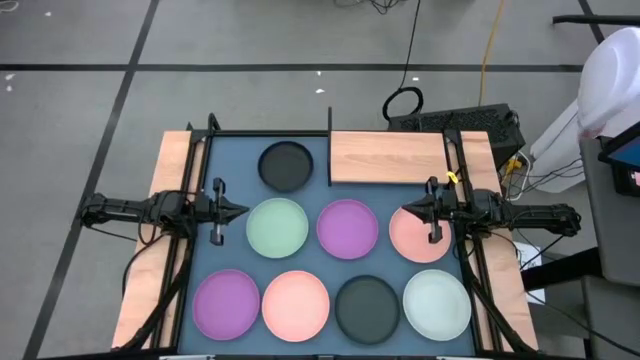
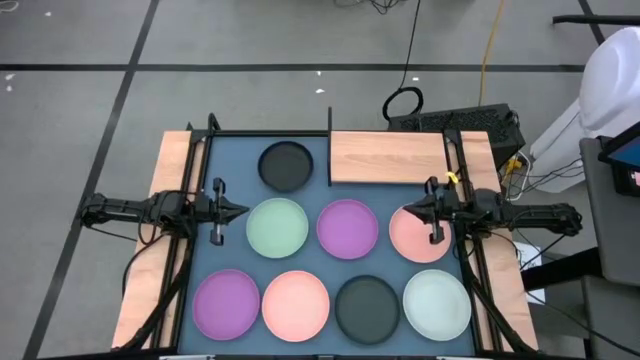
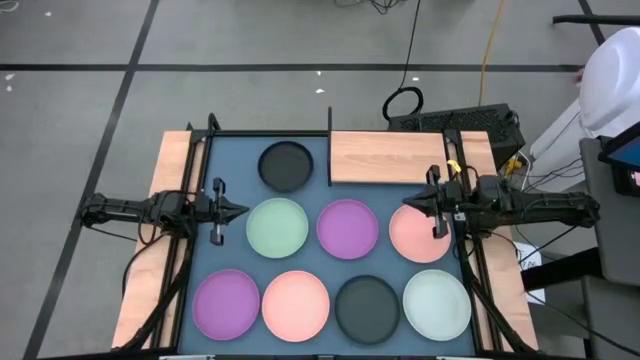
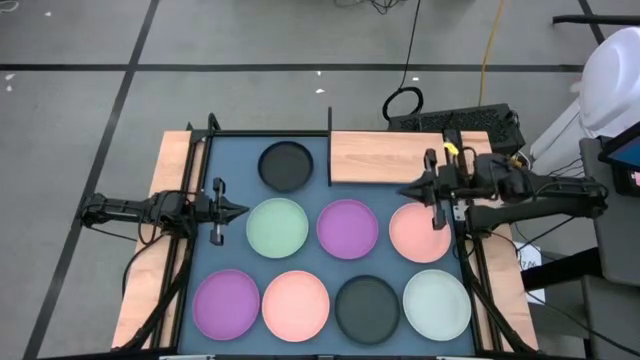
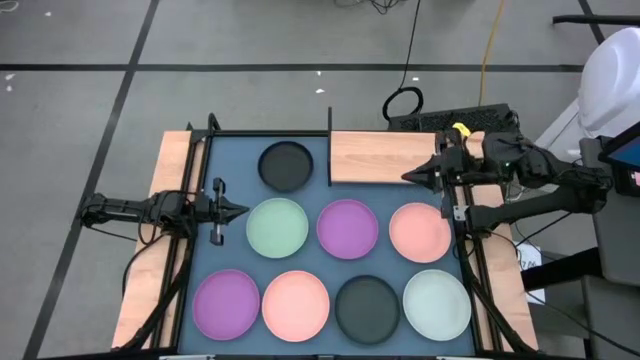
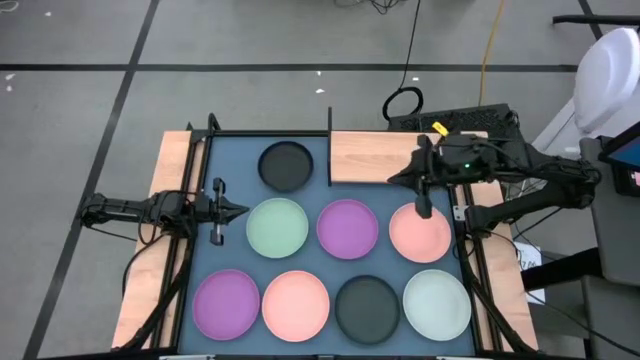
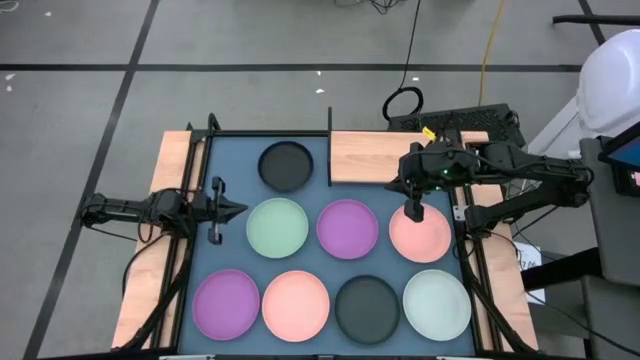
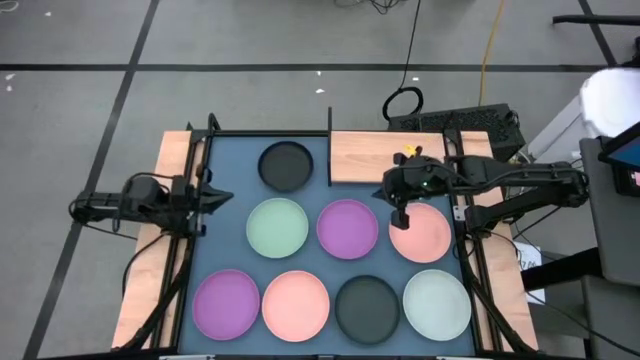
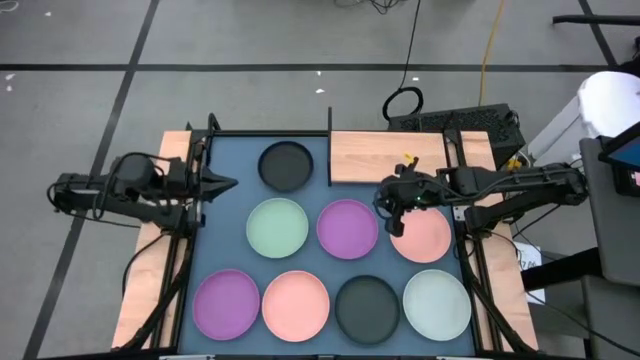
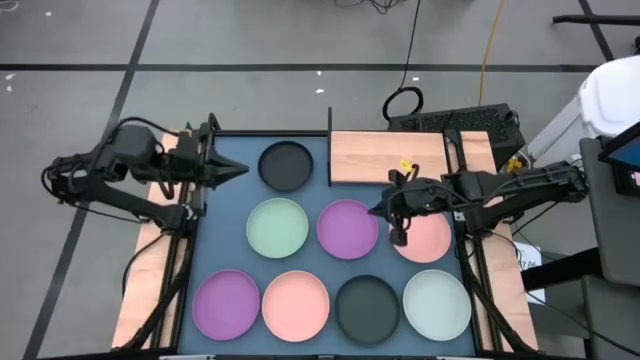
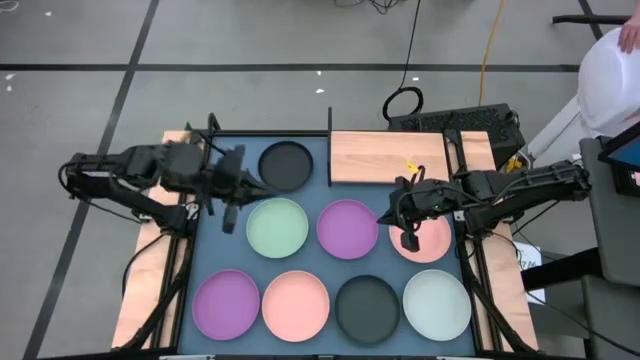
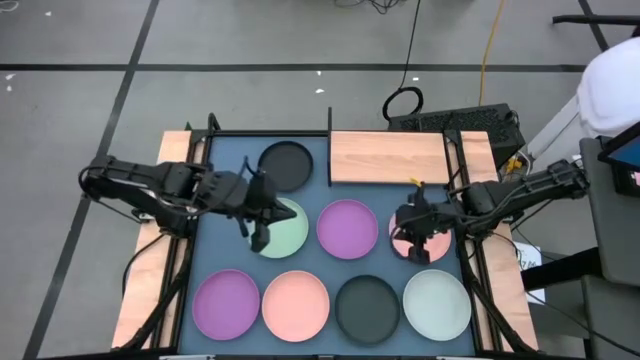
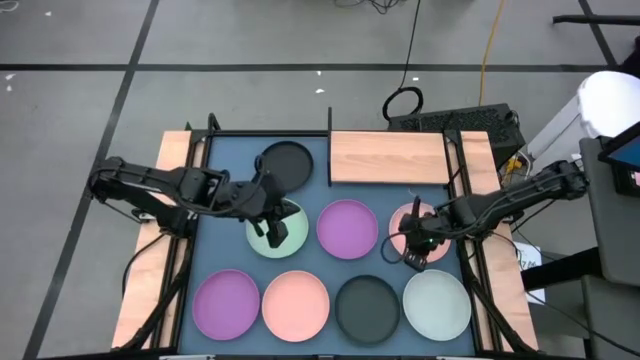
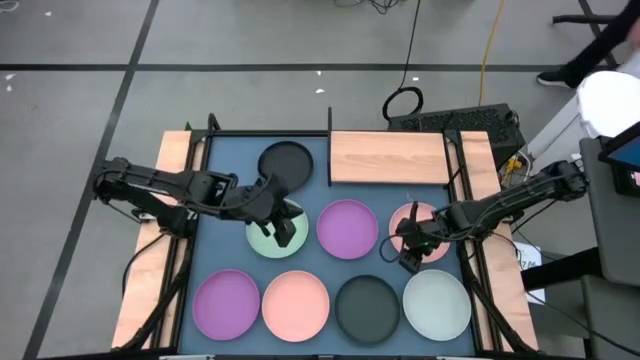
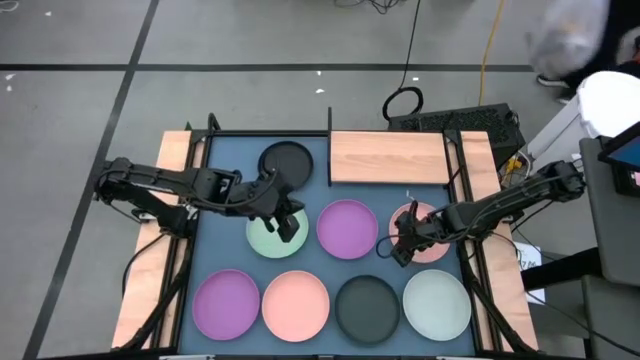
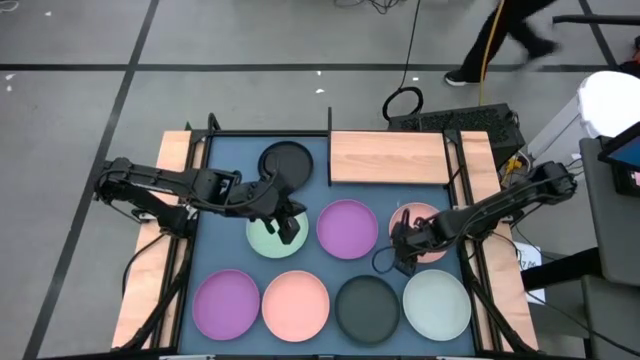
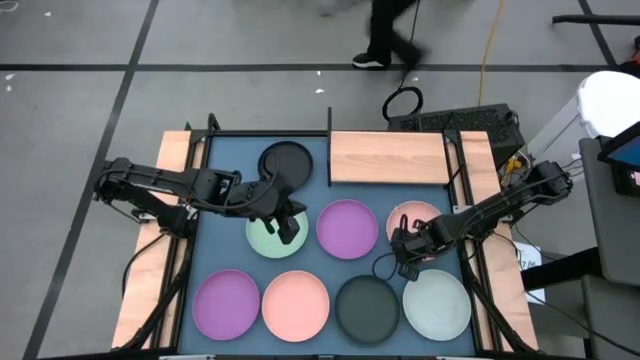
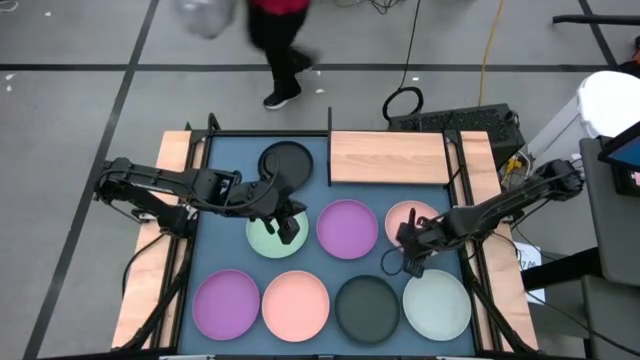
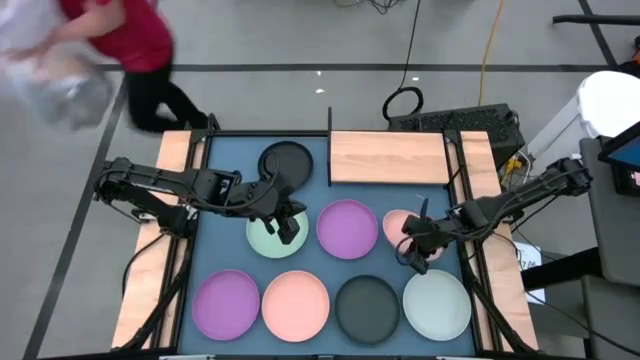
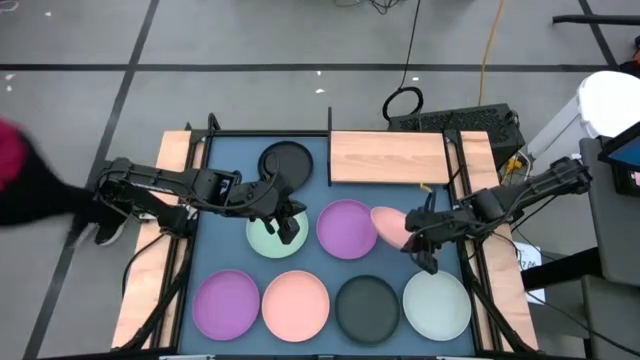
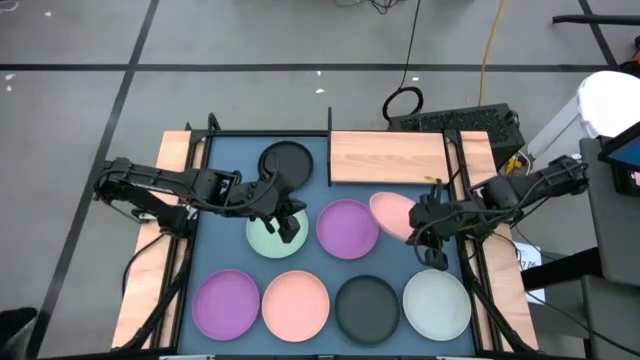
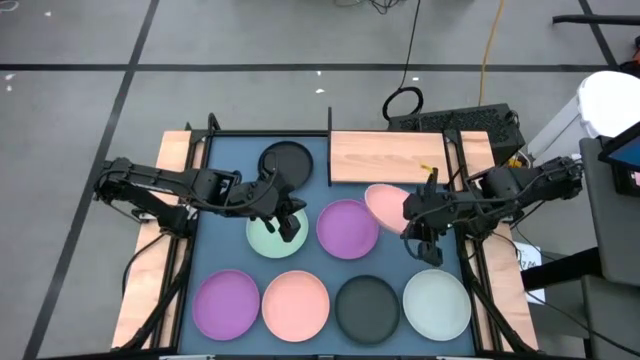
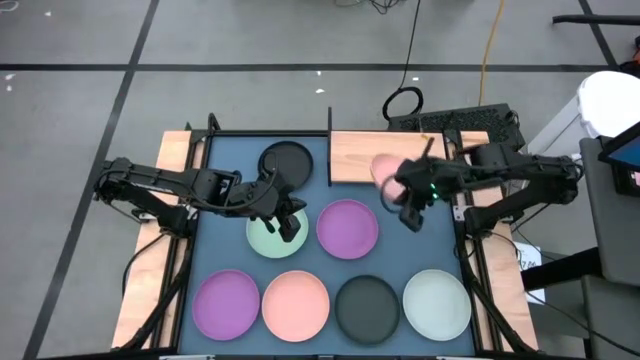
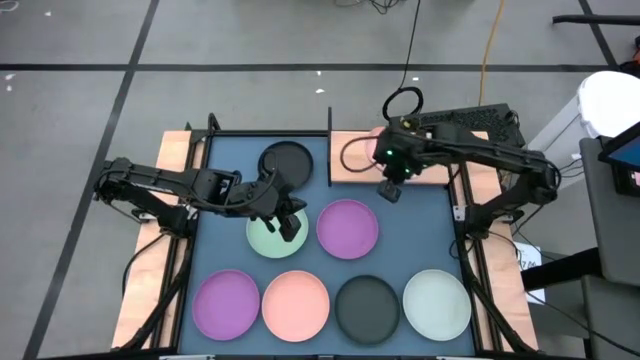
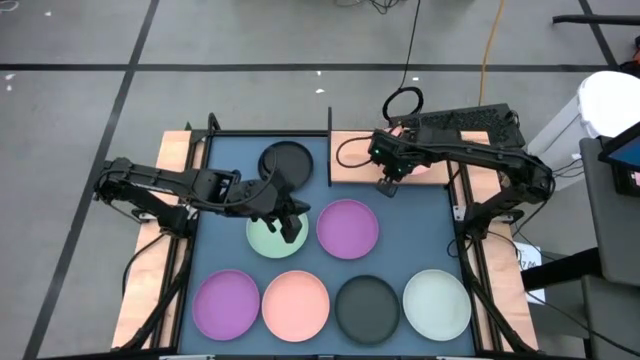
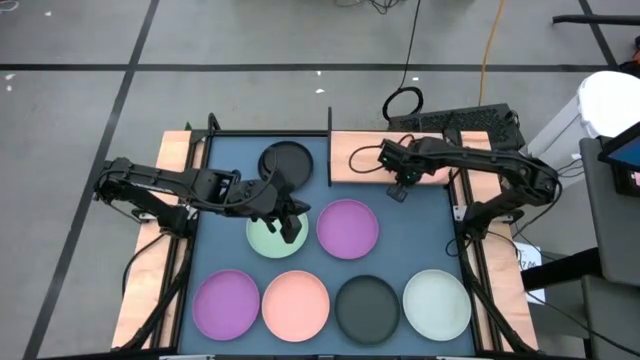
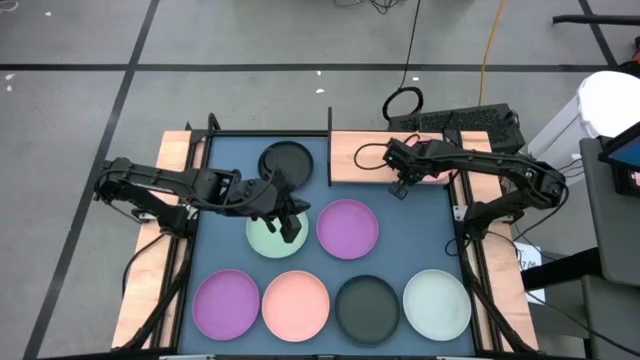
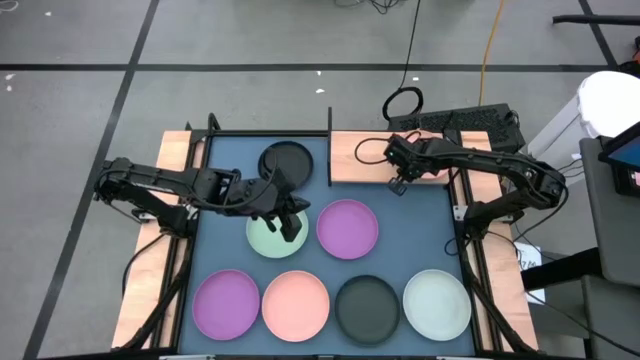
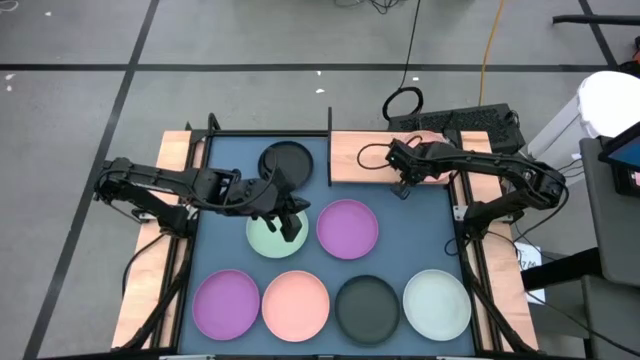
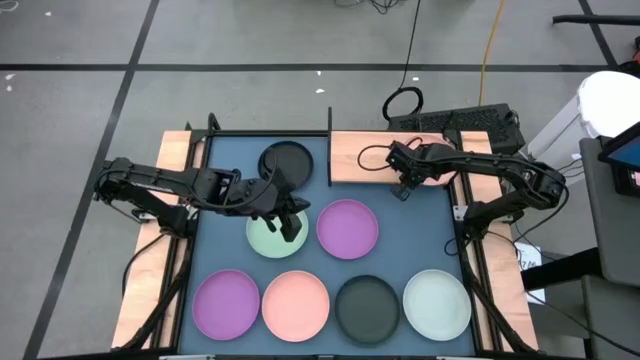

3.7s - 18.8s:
Task: Place and stack plates onto a shelf
Put the top orange plate on the shelf

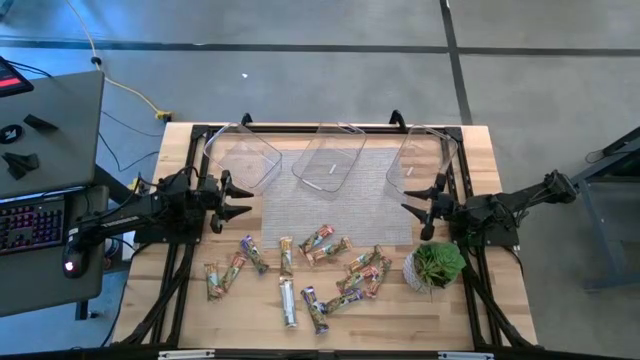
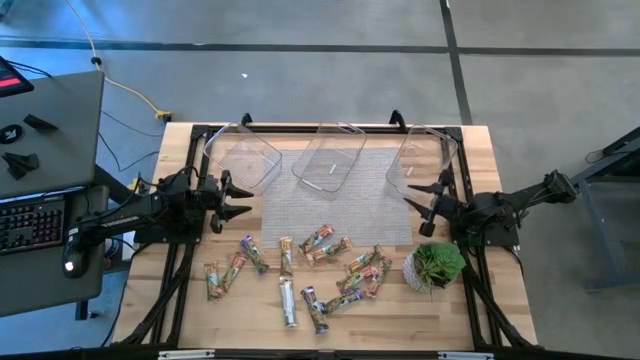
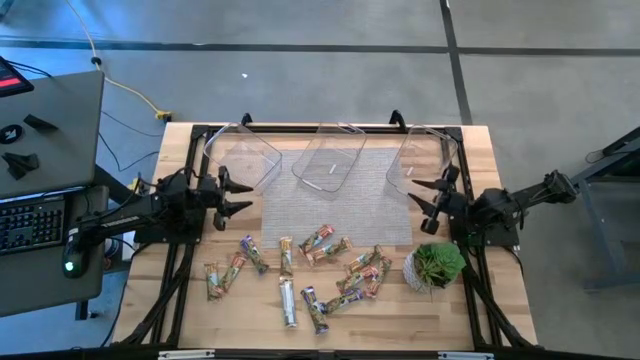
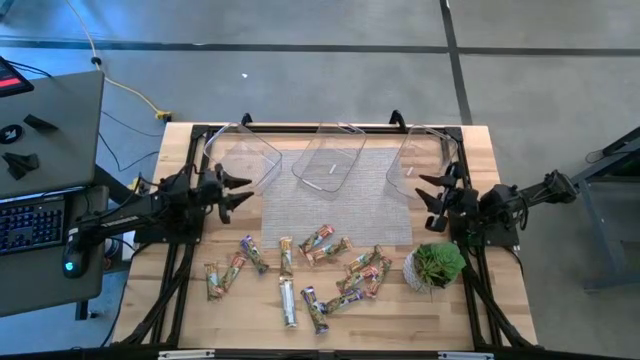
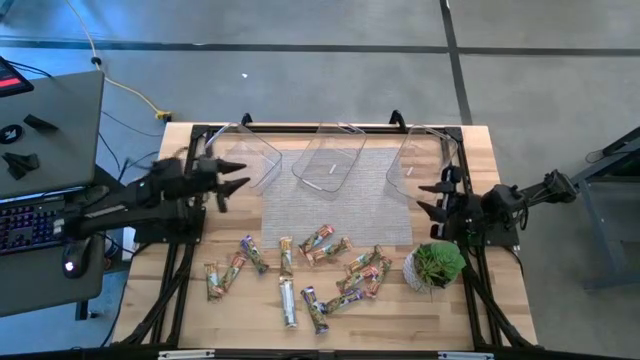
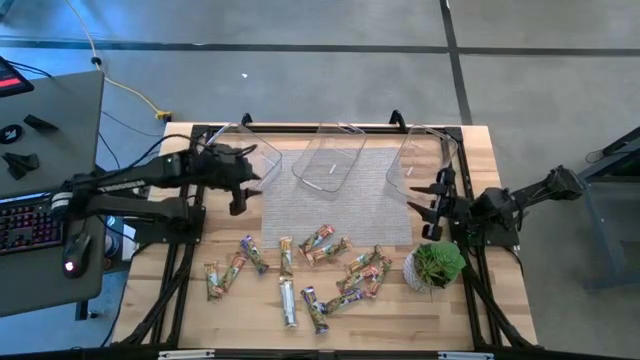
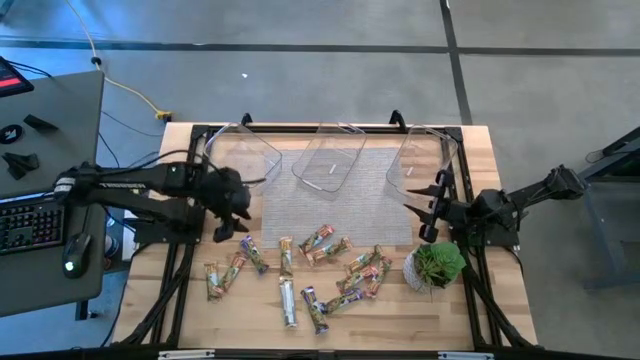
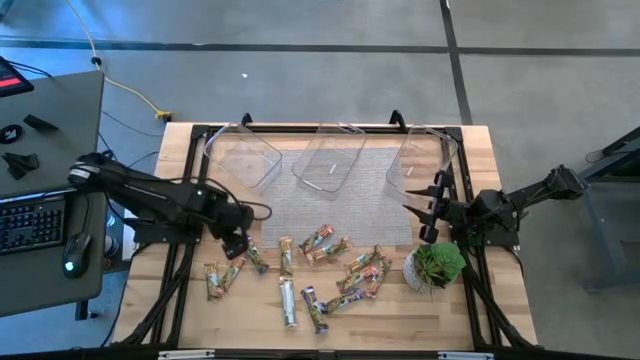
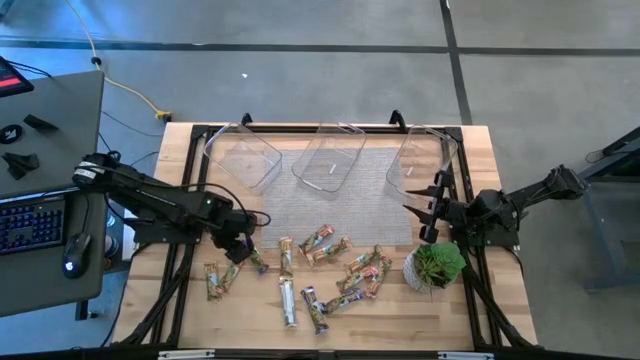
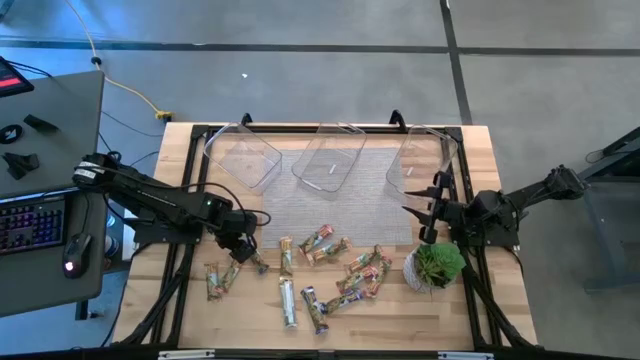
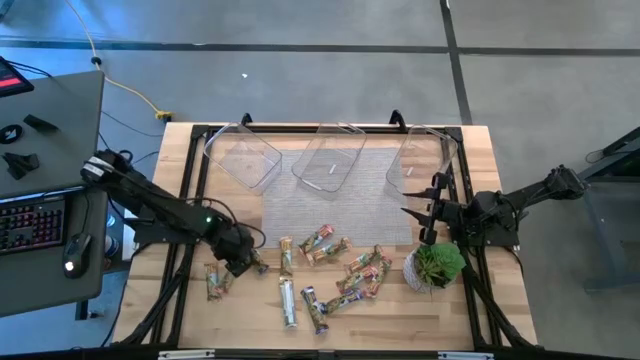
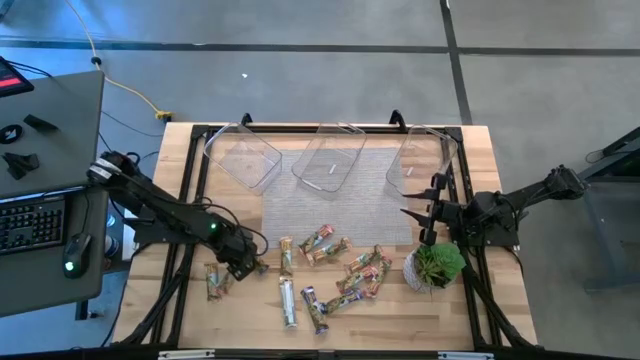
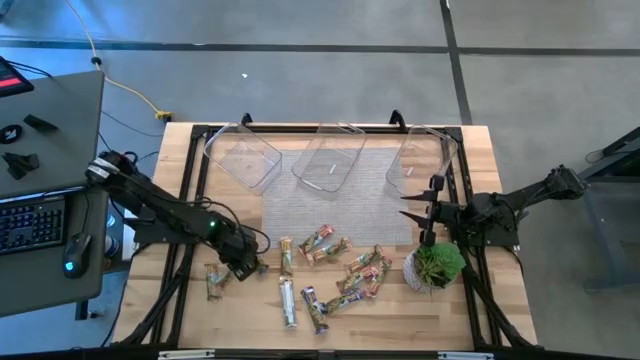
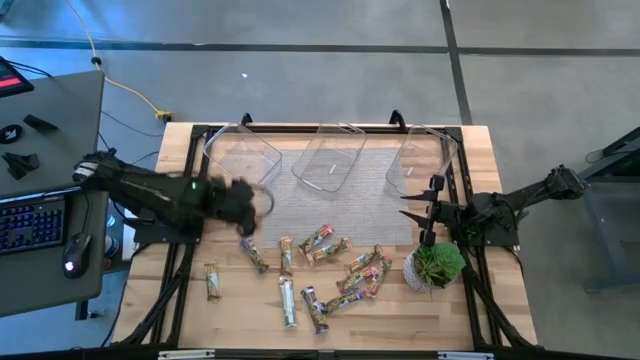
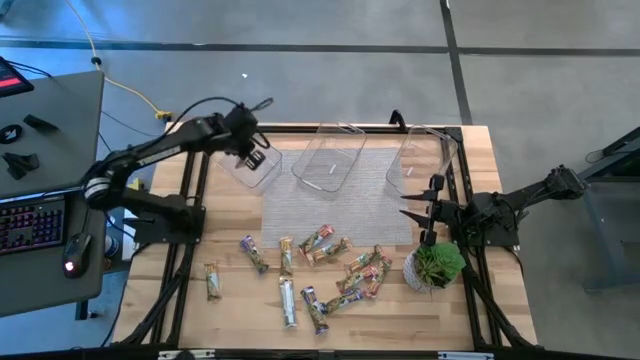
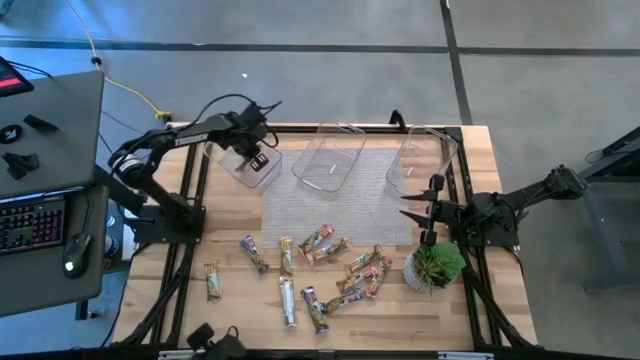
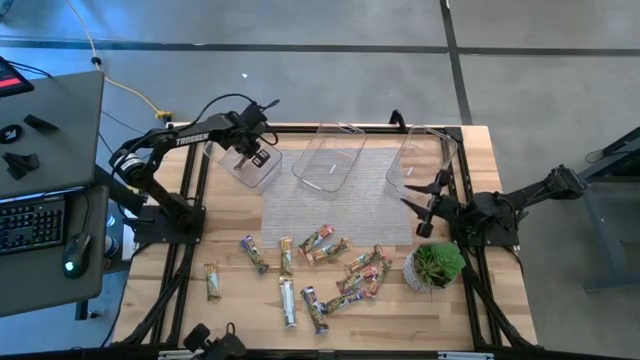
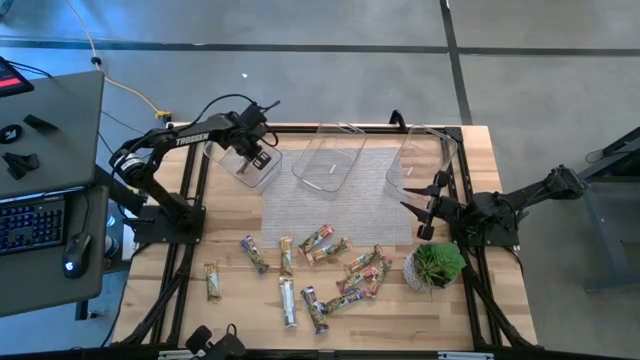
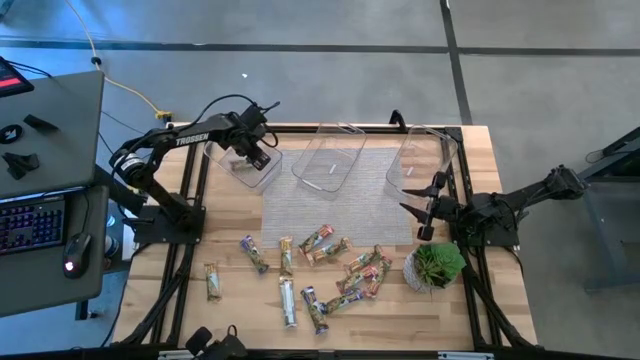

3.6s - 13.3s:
Task: Pick and place Granola Bars by type
Put the red granola bar into the left transparent bin
